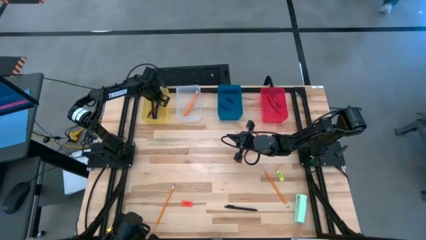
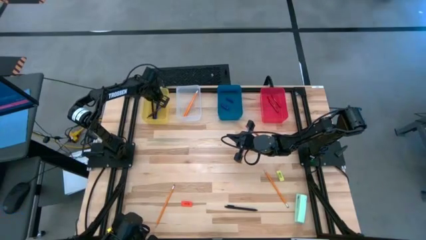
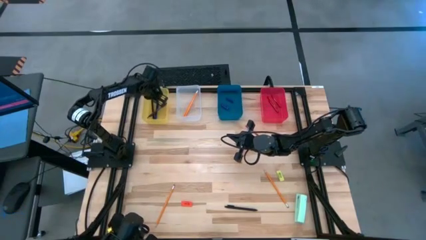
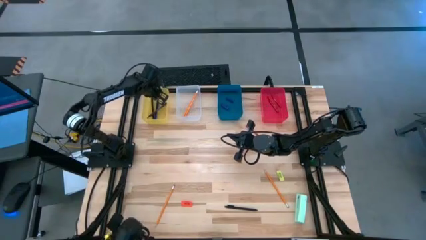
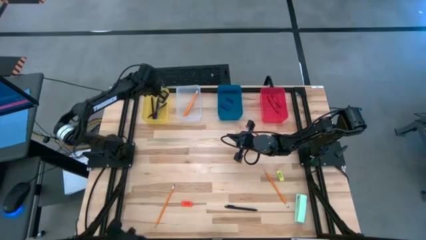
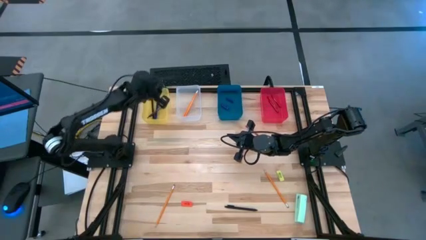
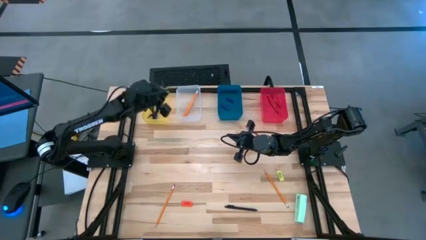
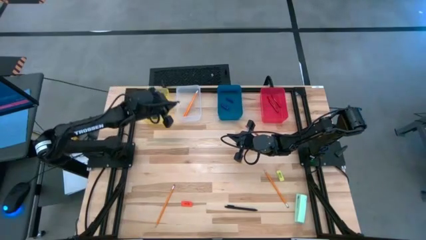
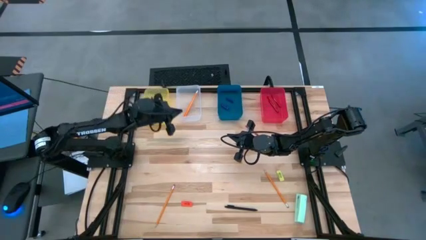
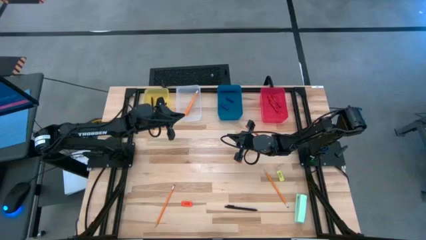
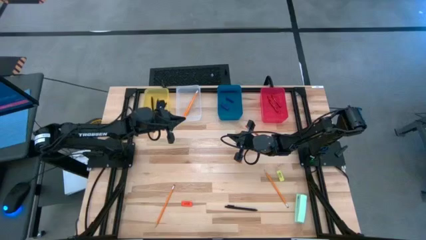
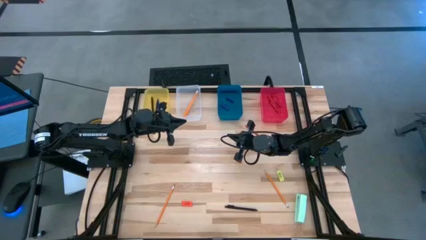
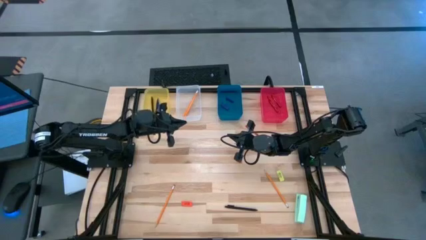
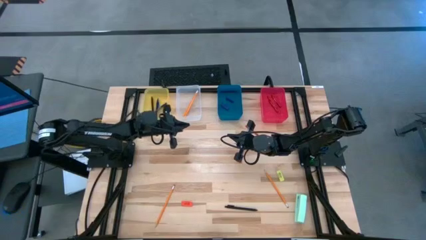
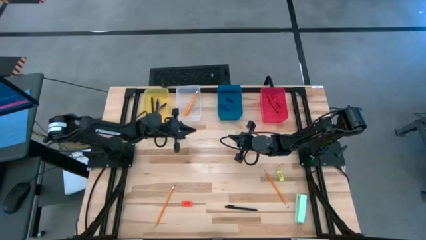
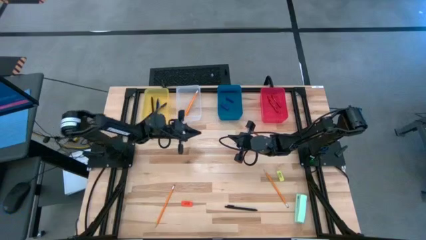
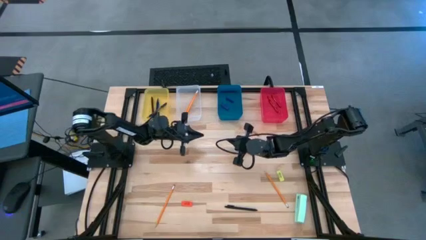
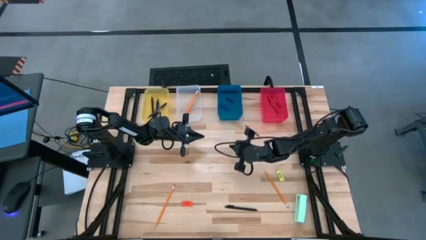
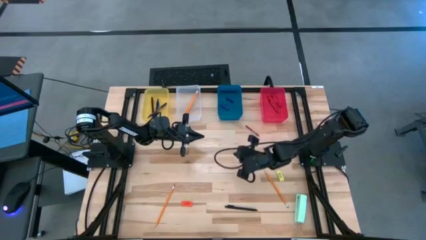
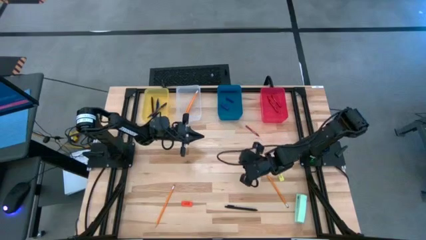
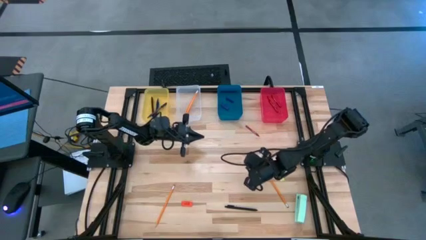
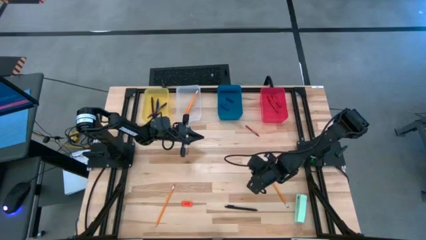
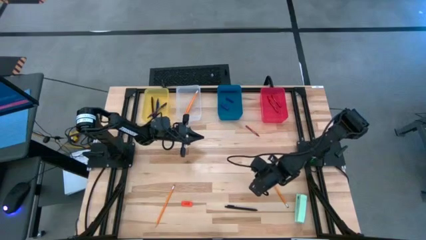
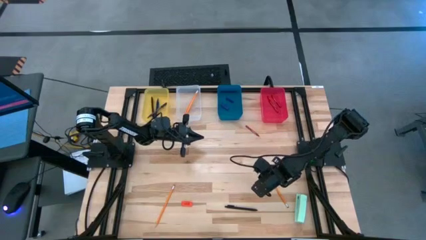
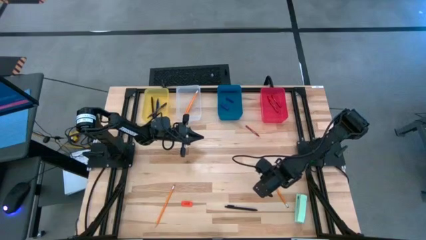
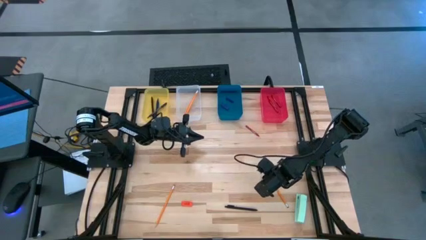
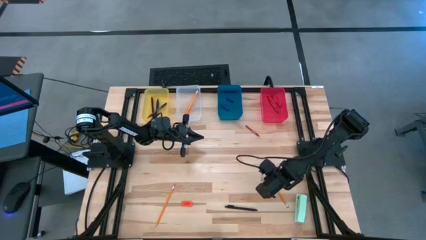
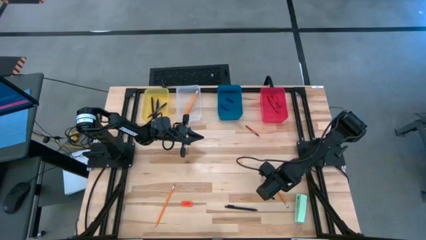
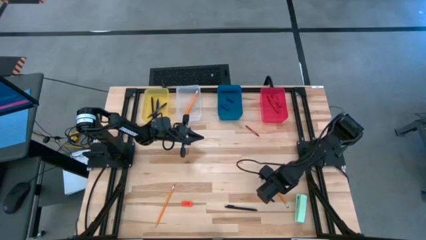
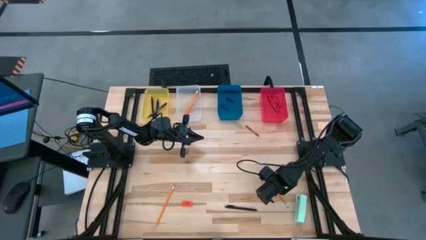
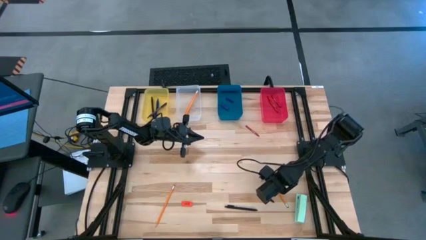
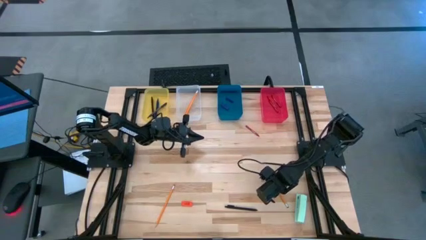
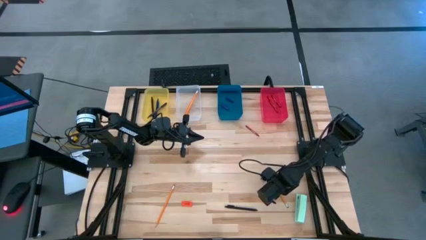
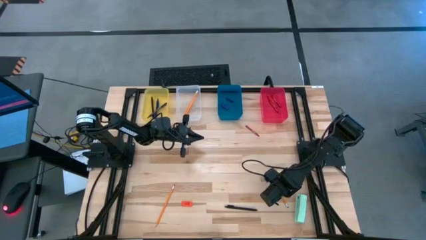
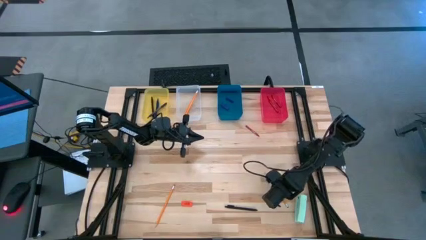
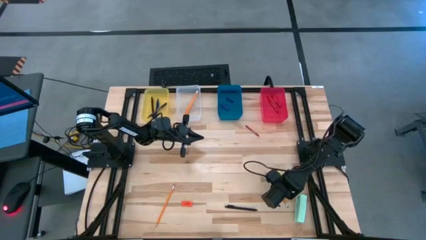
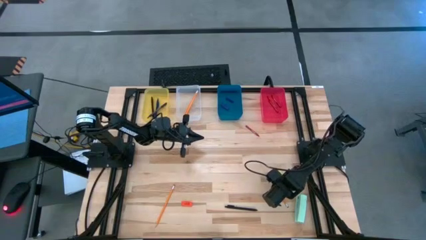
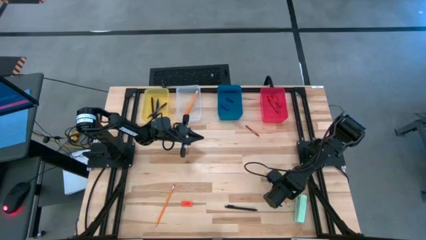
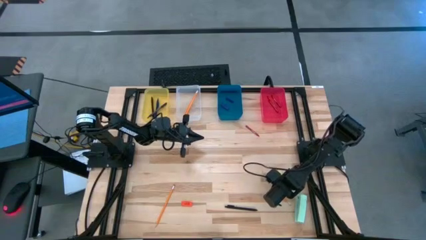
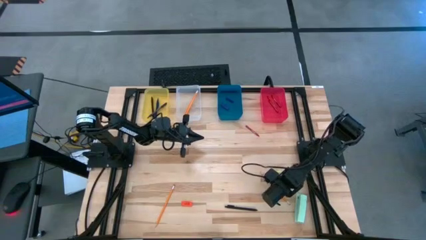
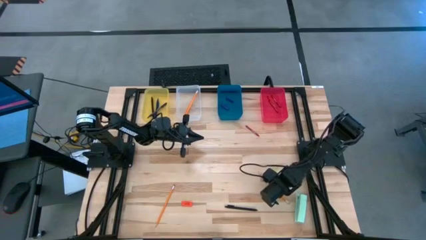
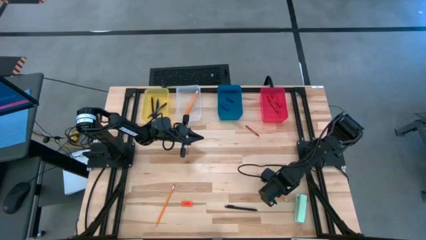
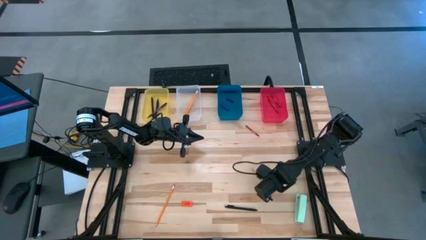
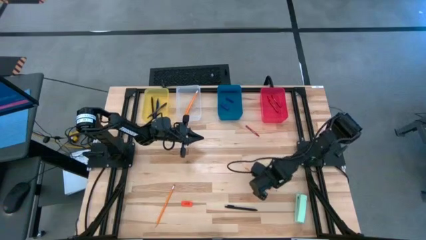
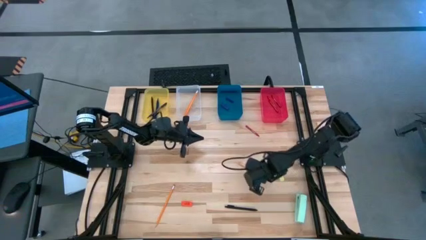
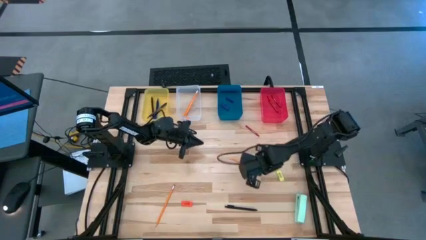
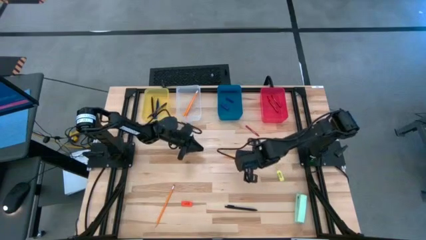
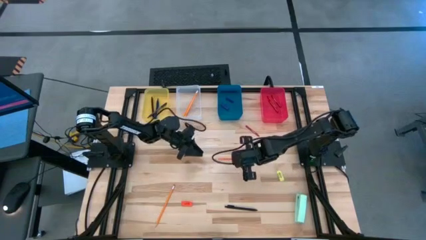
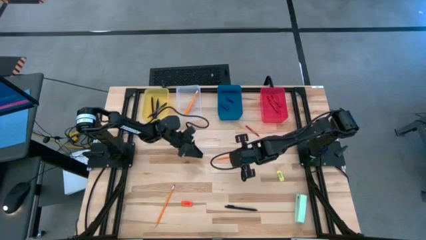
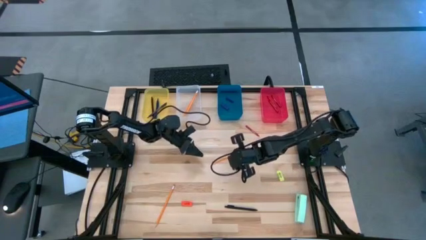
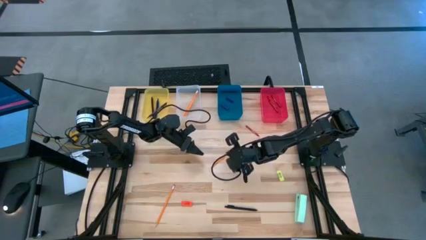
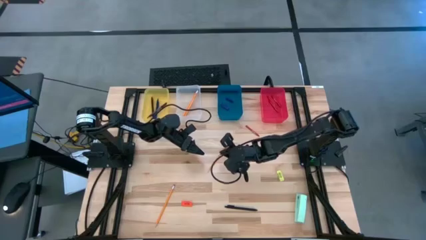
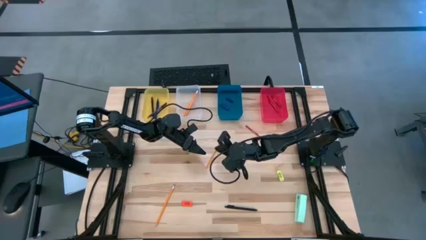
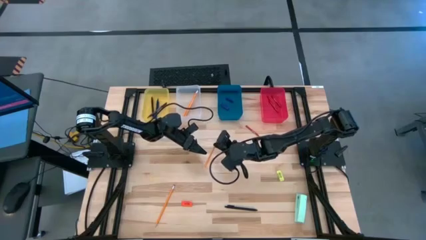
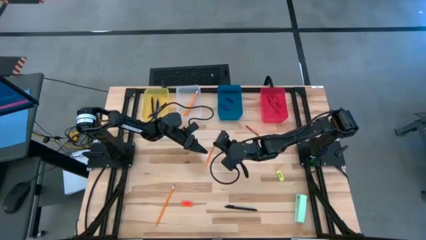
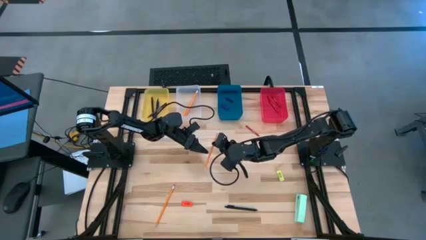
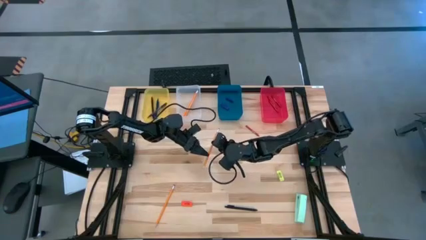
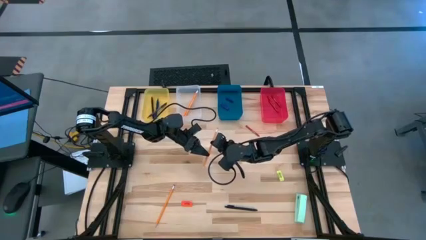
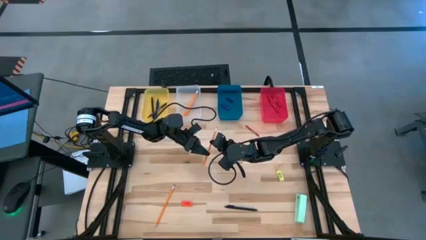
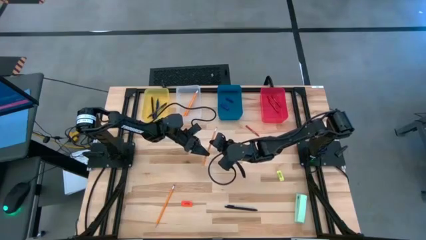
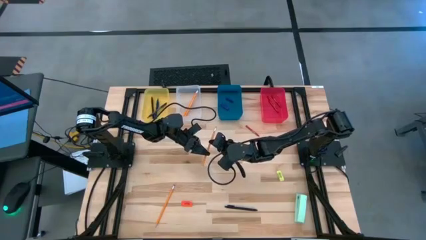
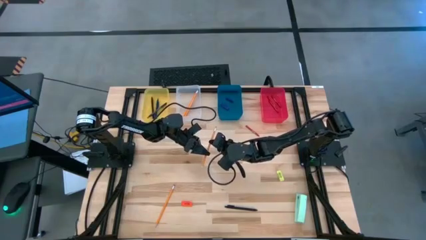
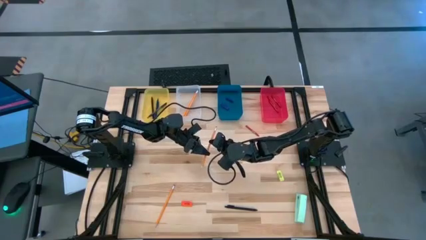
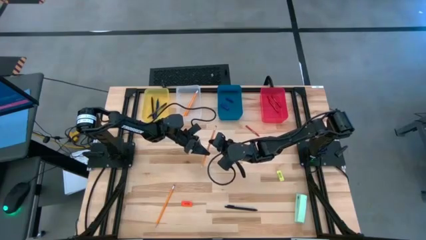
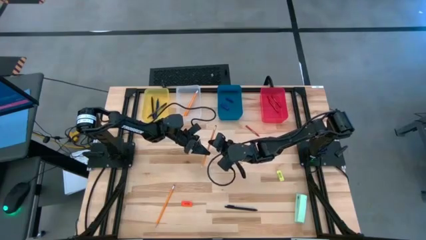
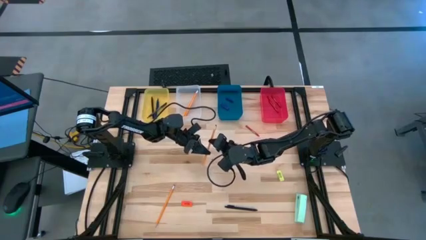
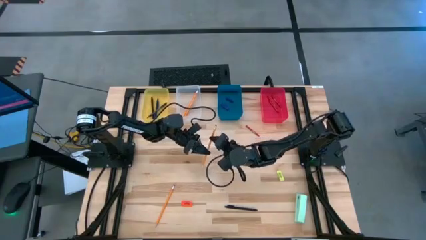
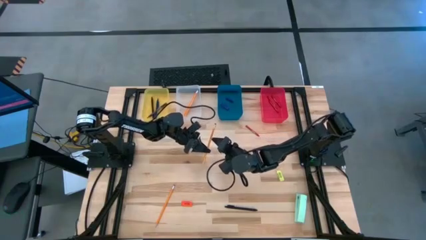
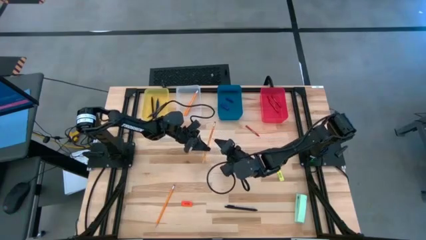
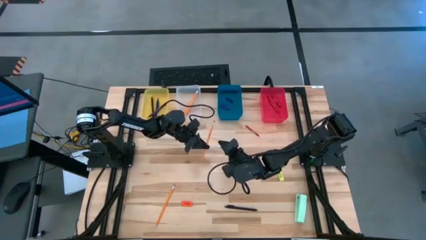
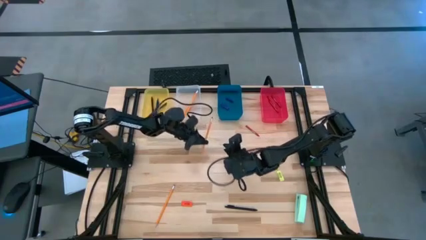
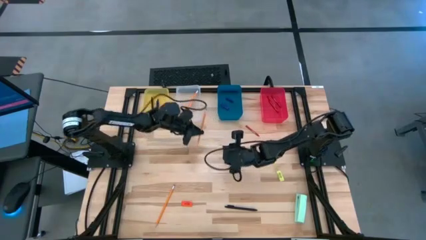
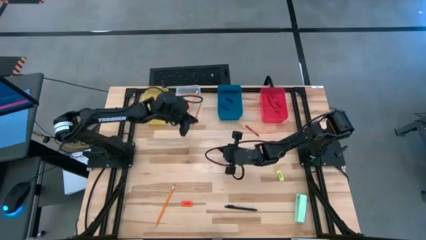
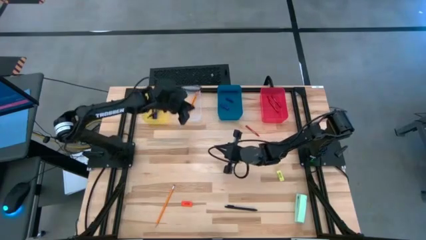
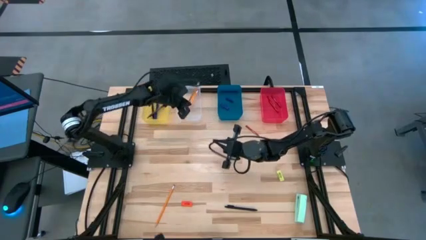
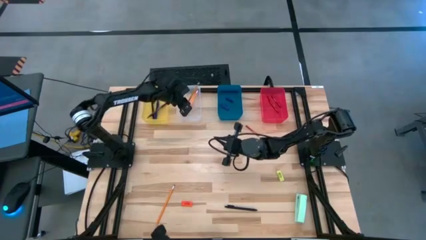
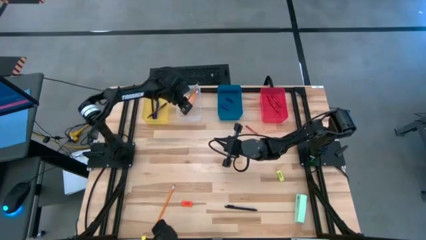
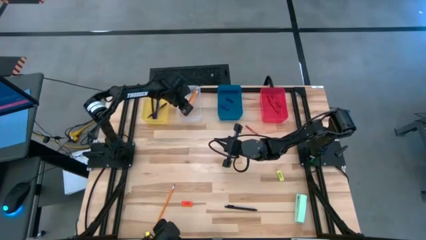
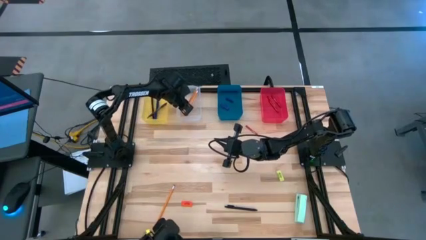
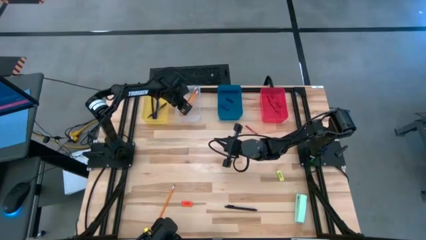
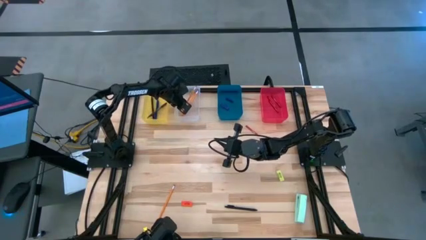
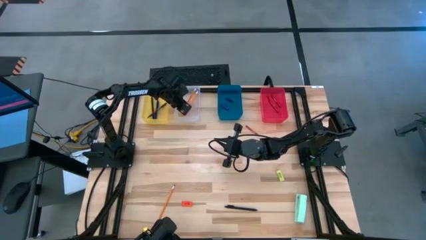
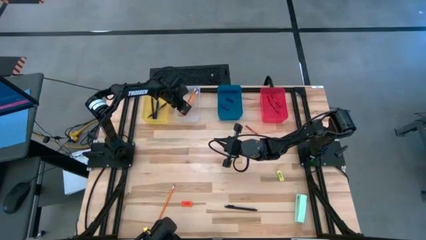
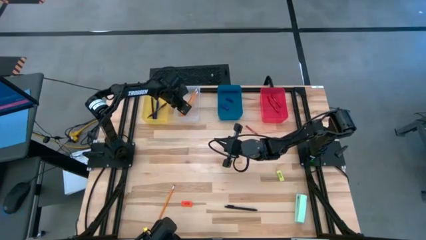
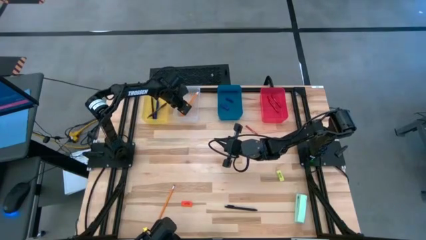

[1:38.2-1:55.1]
Task: Sort crayons/erasers/pens/pencils in bins
Put the orange pencil into the transparent bin
